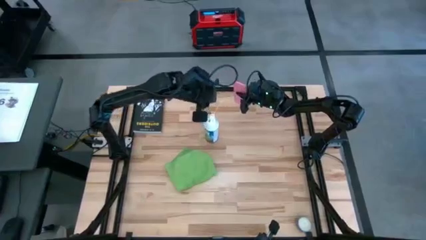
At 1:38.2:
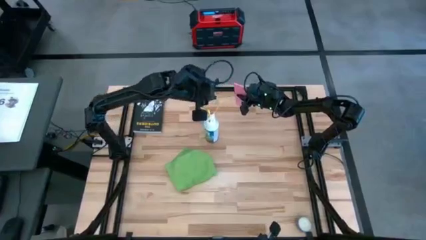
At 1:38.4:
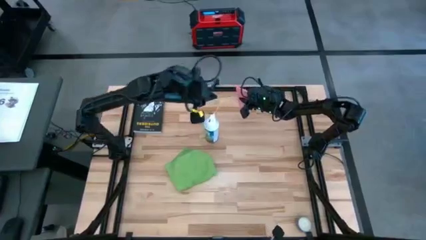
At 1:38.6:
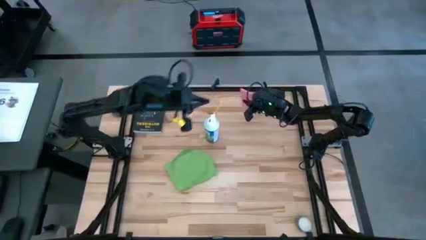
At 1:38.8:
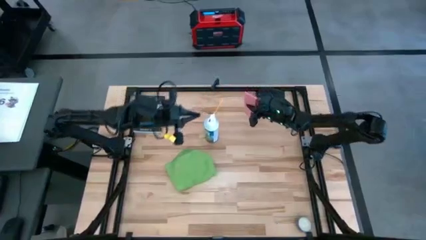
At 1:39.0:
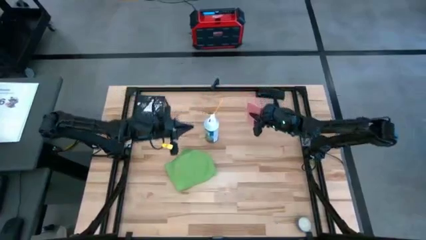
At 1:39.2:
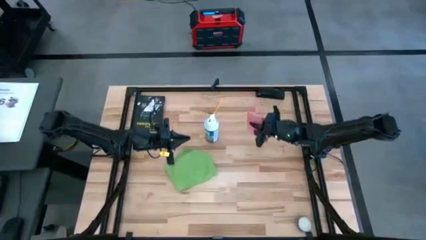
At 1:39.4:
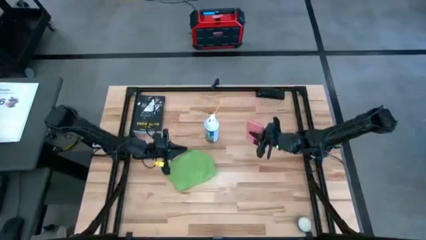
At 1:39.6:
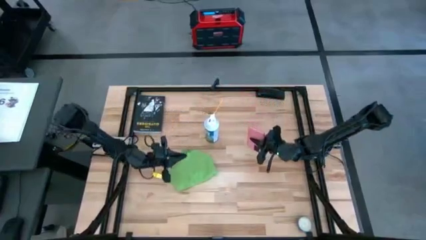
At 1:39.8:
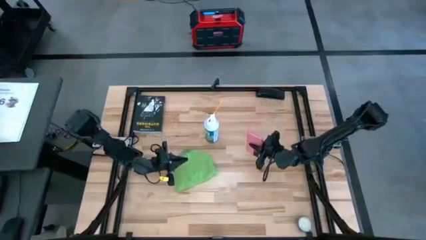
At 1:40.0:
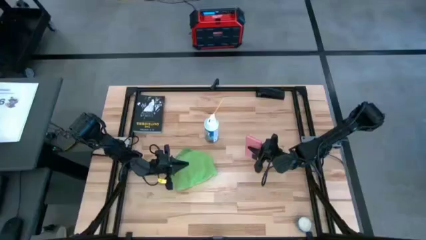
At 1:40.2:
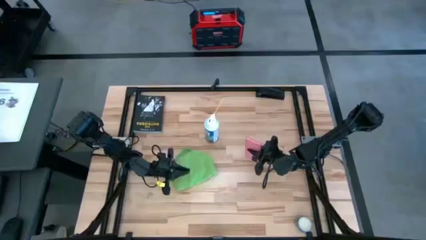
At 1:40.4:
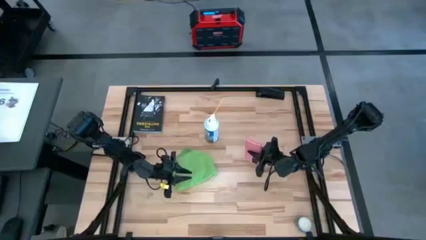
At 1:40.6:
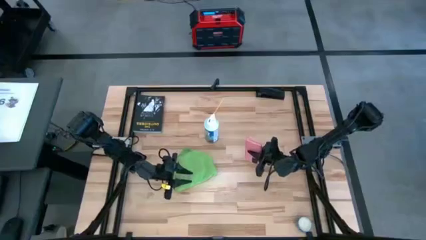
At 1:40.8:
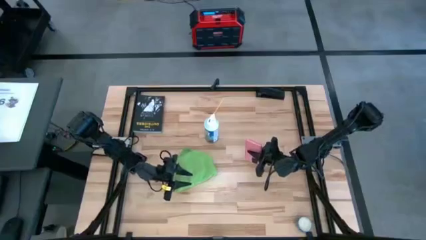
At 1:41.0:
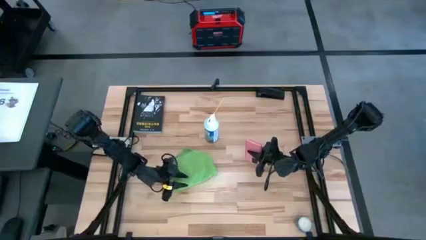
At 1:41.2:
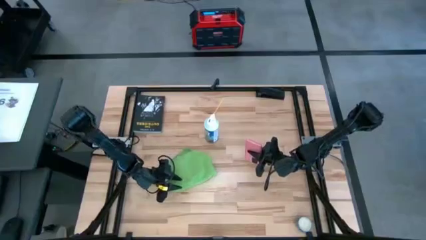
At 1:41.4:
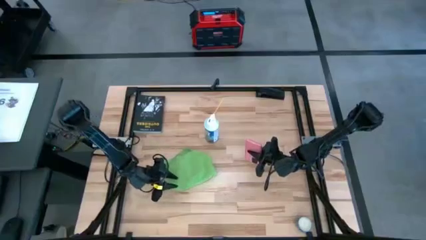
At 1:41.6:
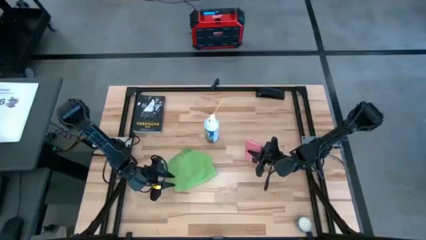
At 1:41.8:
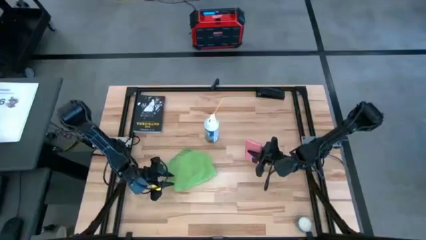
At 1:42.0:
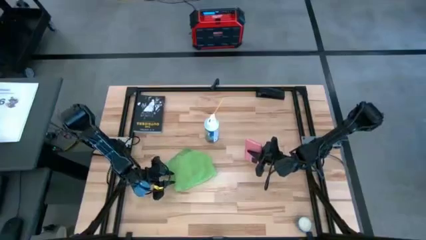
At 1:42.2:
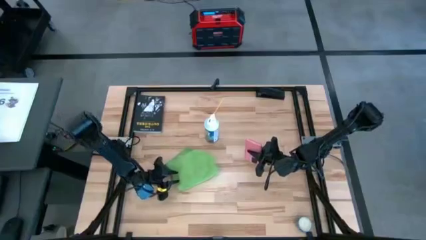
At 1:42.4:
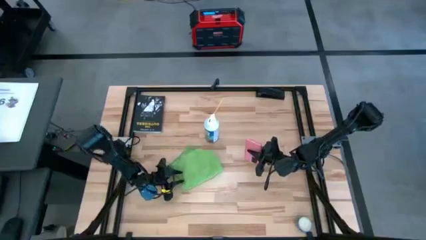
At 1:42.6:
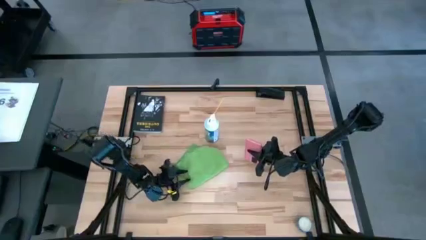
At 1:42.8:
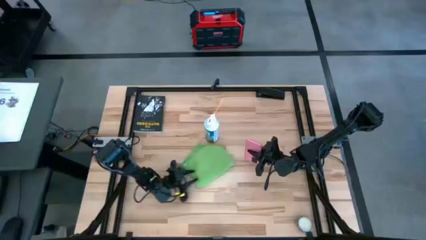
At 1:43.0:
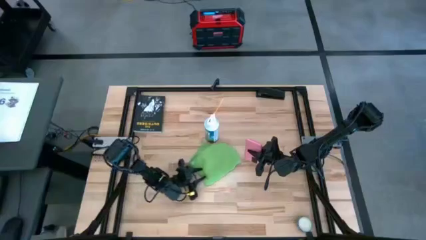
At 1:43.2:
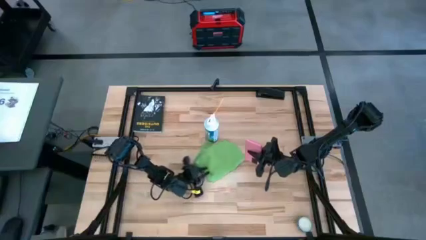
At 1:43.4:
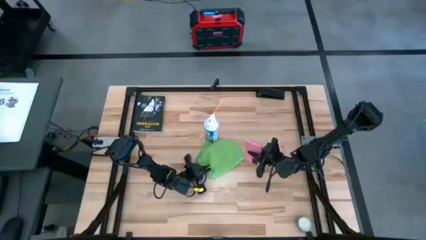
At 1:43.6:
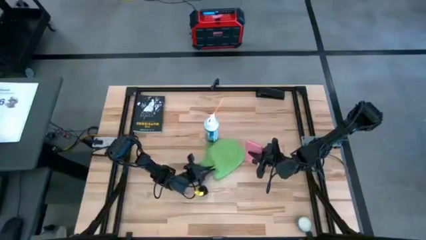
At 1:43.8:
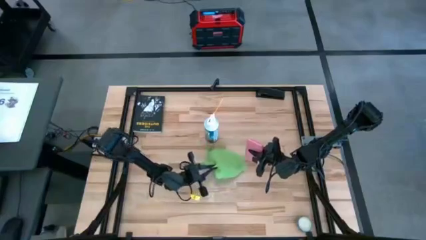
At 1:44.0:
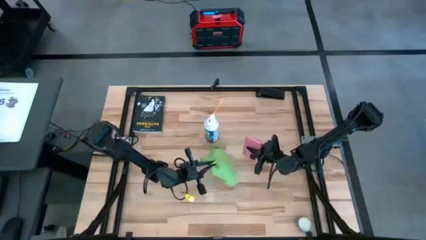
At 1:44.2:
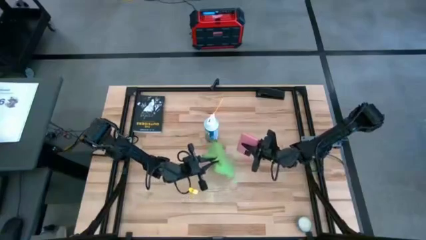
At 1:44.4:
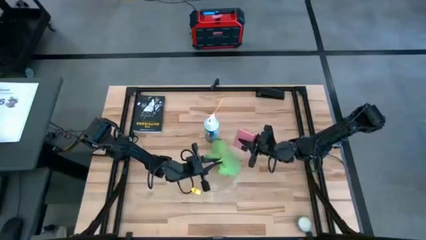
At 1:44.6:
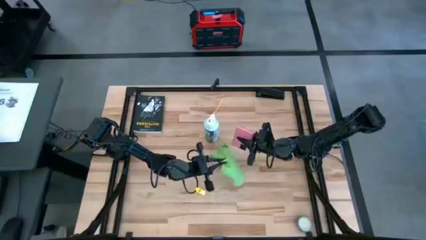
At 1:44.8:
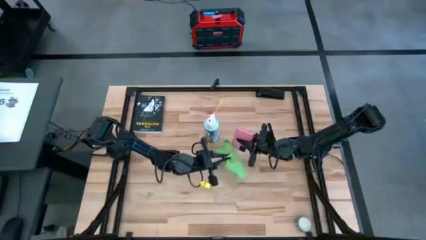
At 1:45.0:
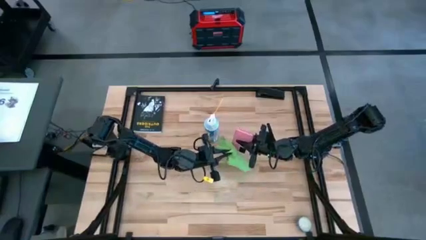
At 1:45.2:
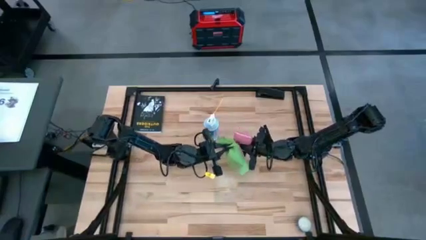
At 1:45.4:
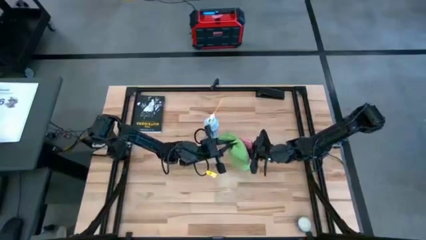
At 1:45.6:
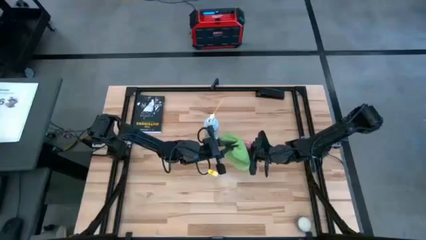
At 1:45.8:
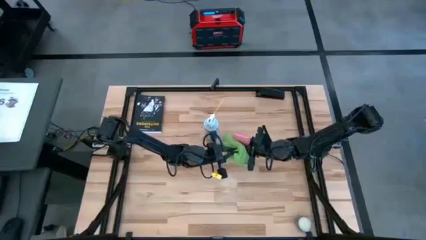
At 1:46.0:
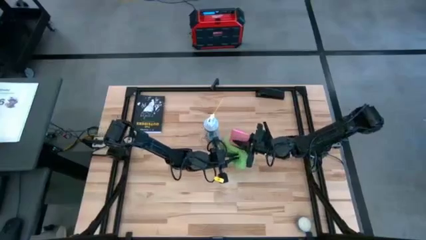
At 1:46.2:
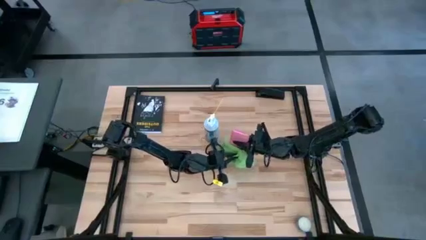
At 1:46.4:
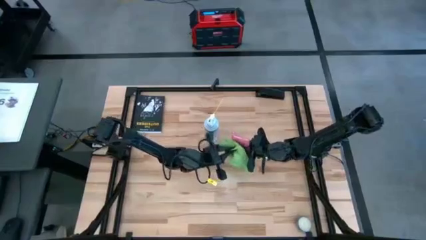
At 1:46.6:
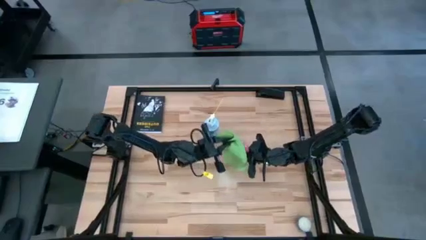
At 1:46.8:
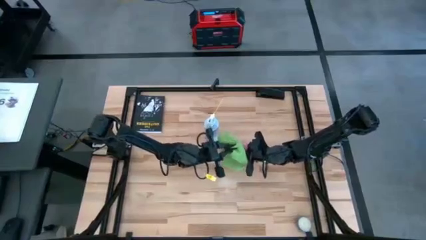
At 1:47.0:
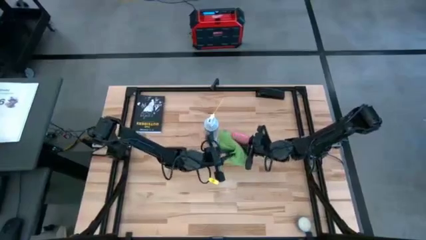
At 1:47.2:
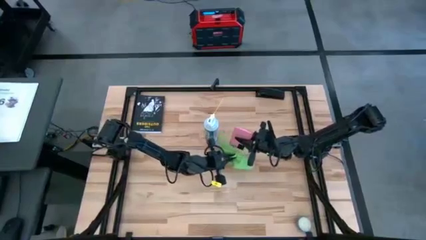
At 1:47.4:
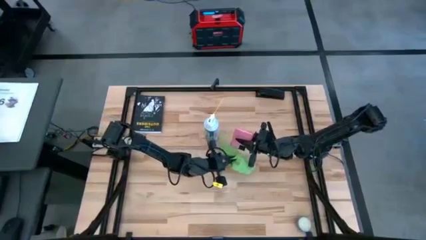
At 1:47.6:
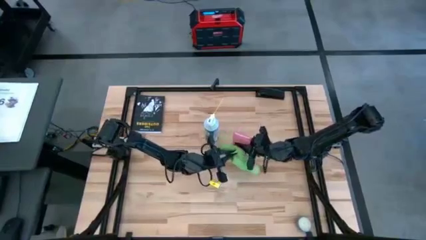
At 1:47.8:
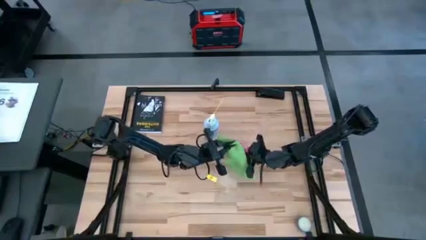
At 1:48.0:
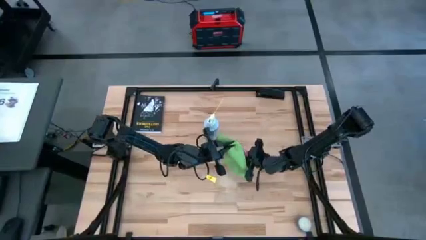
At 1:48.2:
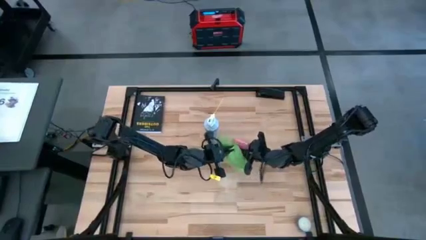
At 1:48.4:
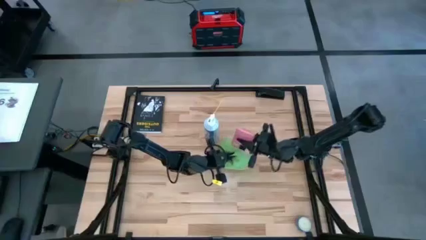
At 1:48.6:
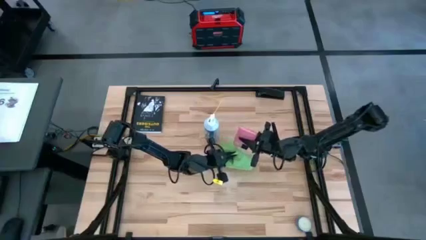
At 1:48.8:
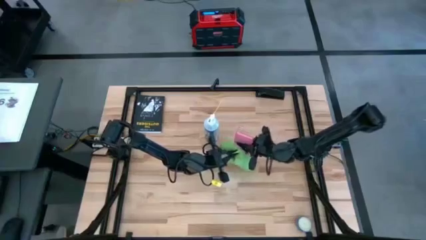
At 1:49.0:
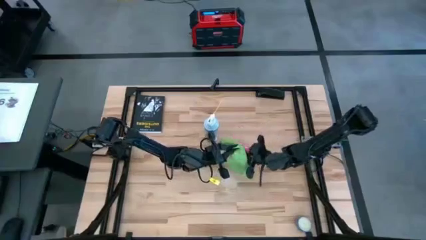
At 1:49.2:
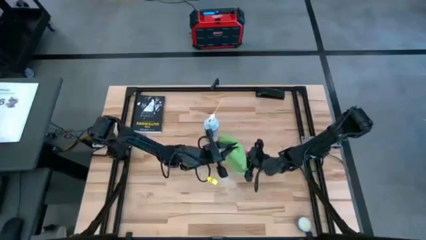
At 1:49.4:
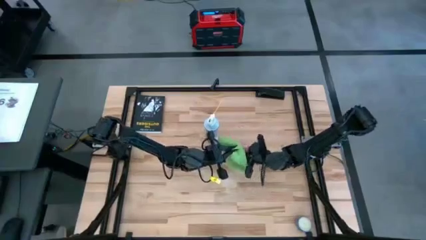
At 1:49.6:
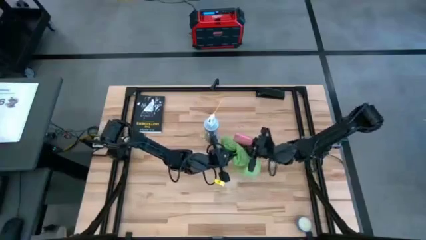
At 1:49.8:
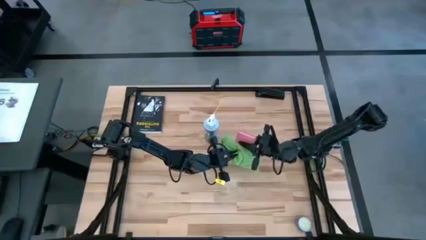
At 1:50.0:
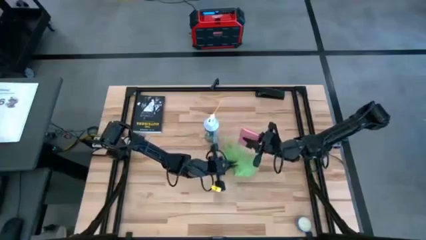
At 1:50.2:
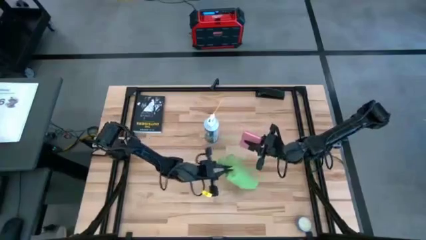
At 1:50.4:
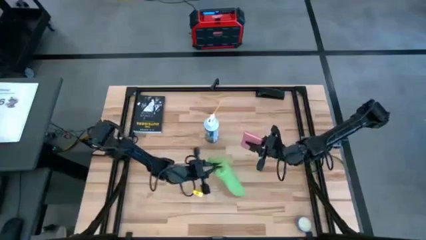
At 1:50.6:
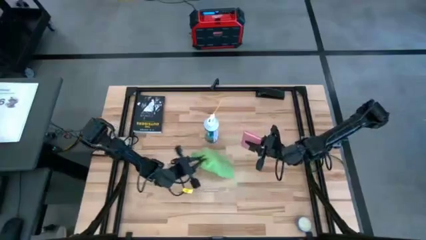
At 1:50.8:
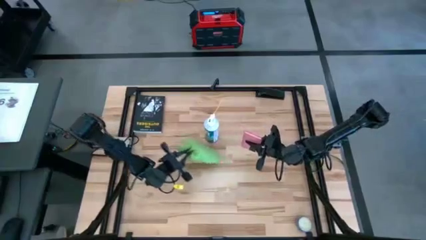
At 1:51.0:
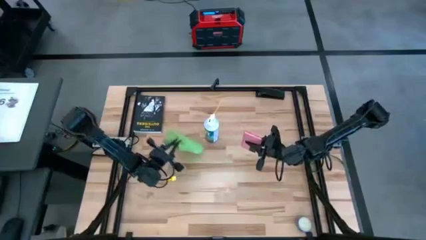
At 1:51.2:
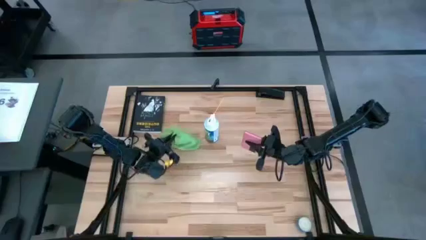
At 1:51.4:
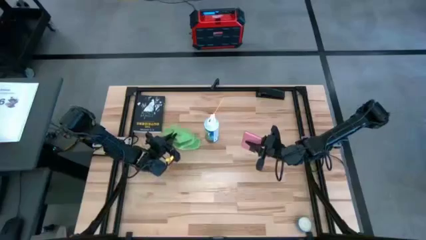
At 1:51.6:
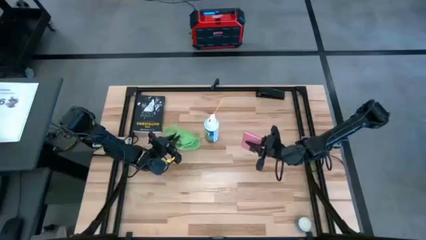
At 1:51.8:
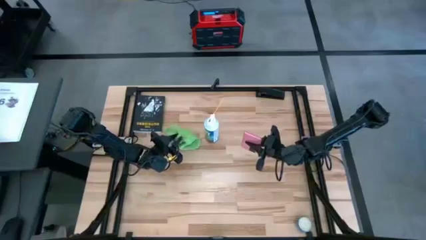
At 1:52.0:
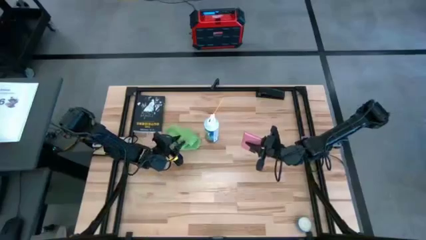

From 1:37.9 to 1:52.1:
Task: Apply microfiber cloth
Wipe the pink cellphone with the green microfiber cloth

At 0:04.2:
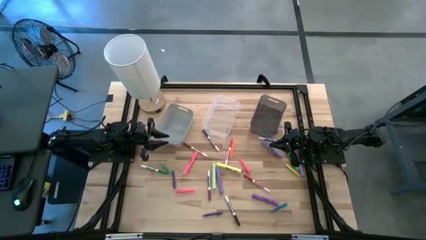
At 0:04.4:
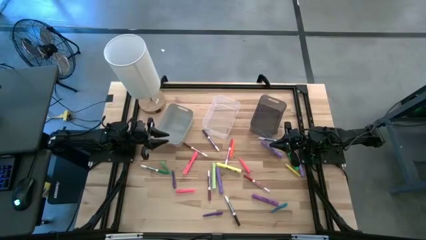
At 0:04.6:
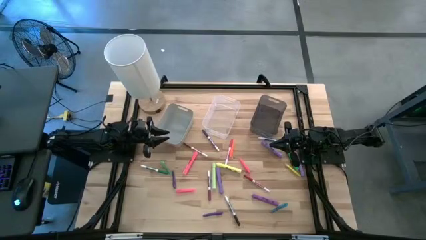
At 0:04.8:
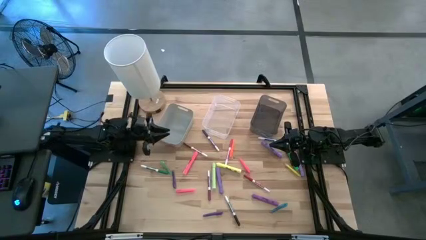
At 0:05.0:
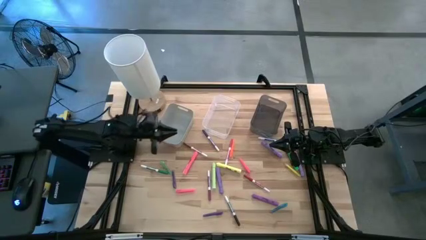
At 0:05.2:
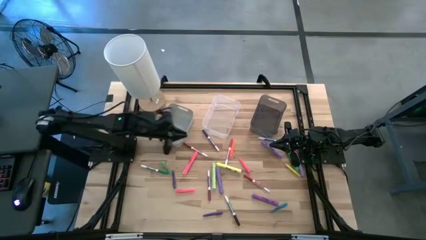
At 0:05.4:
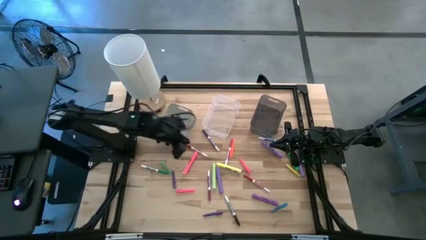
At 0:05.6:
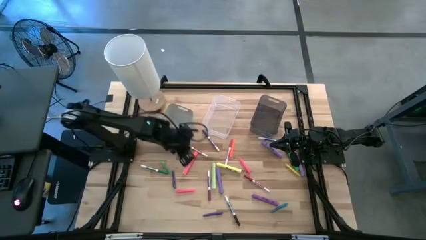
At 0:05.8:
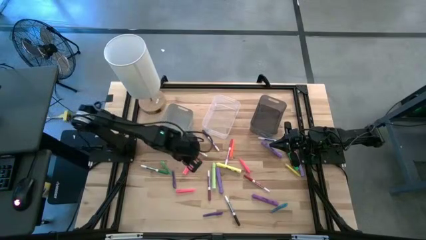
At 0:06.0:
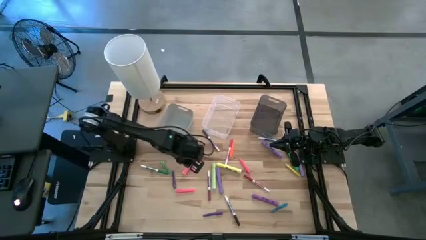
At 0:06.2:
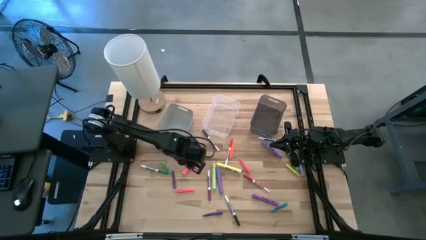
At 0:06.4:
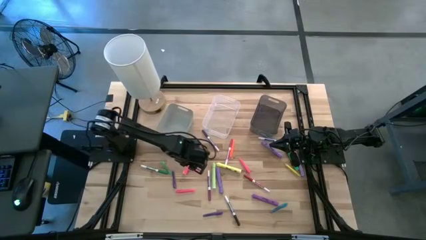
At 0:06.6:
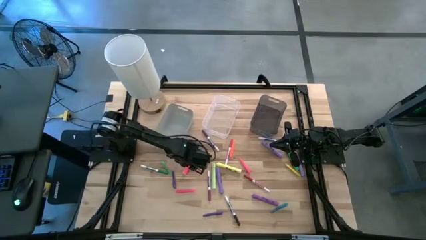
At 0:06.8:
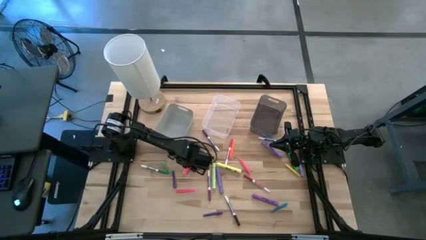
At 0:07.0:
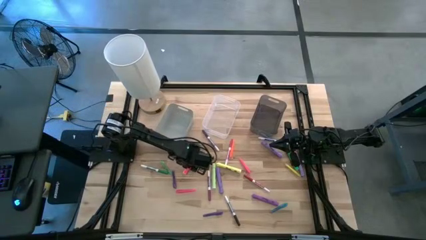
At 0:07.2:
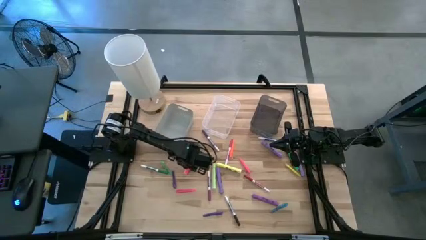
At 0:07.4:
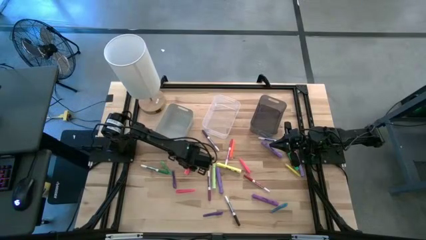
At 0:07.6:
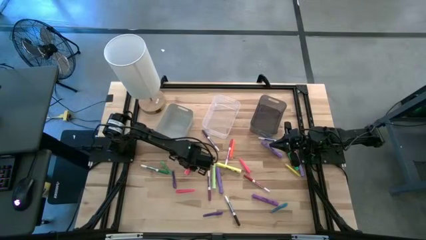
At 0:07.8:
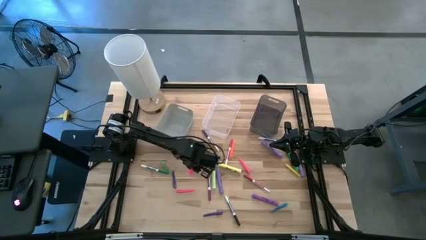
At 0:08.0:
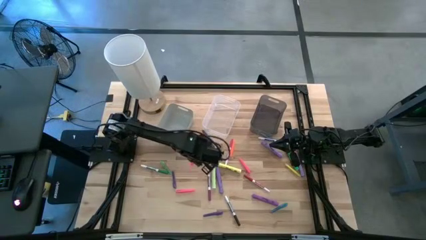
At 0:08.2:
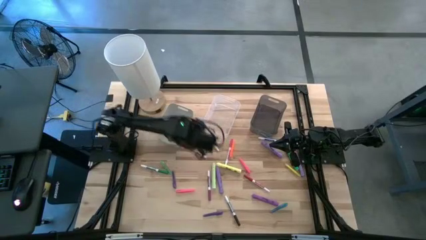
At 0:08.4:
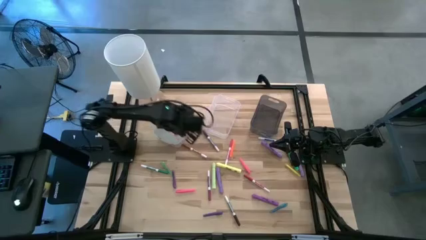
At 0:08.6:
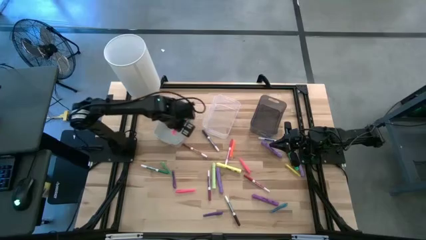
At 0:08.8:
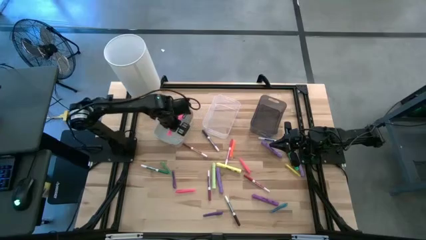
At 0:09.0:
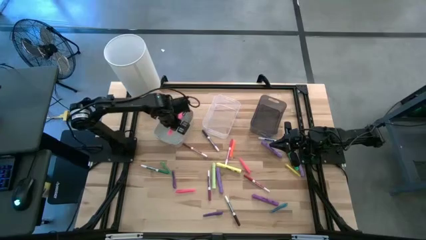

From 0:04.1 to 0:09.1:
Task: Pick & Place Markers
Put the pink highlighter into the gray bin
